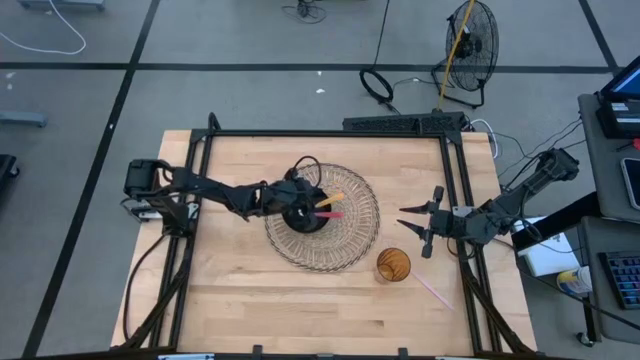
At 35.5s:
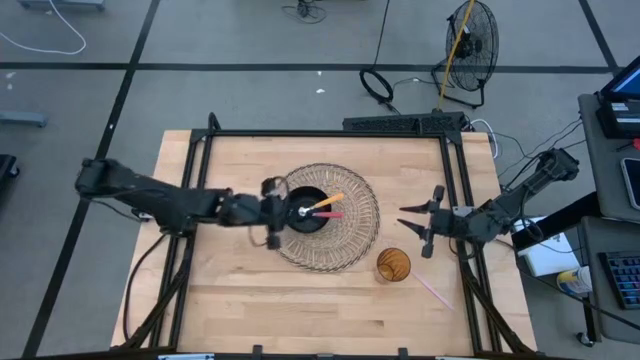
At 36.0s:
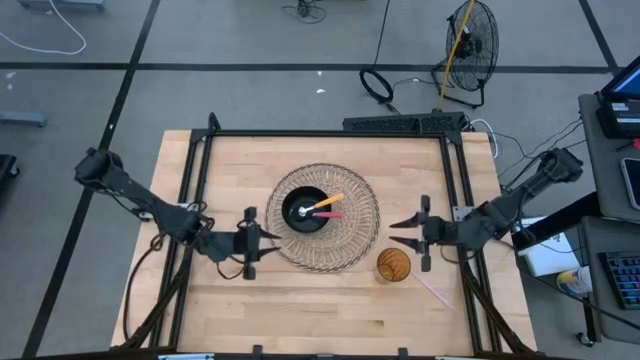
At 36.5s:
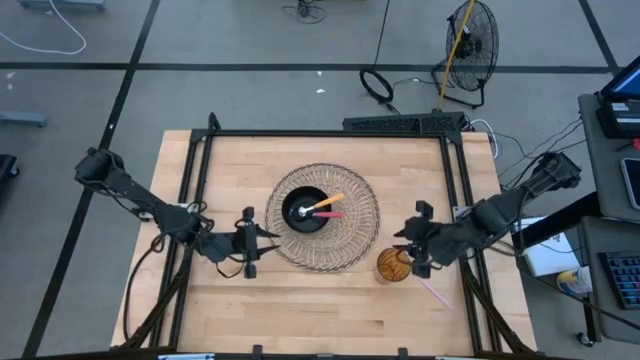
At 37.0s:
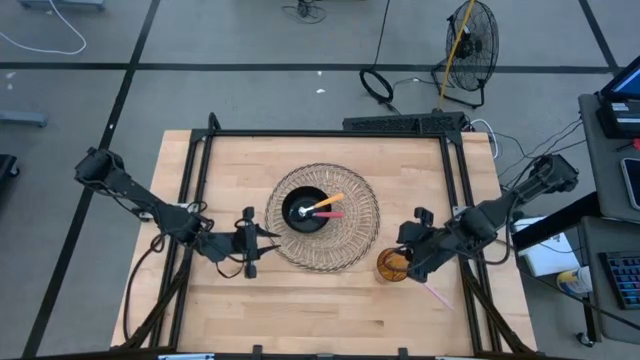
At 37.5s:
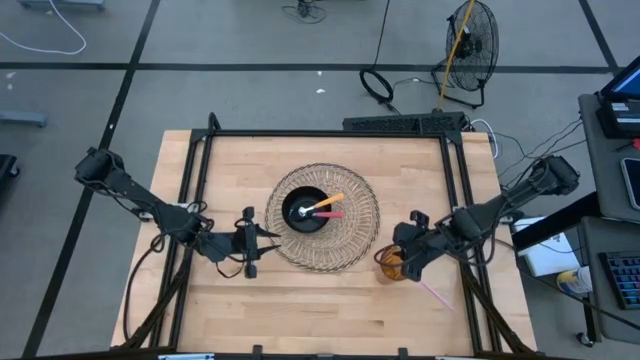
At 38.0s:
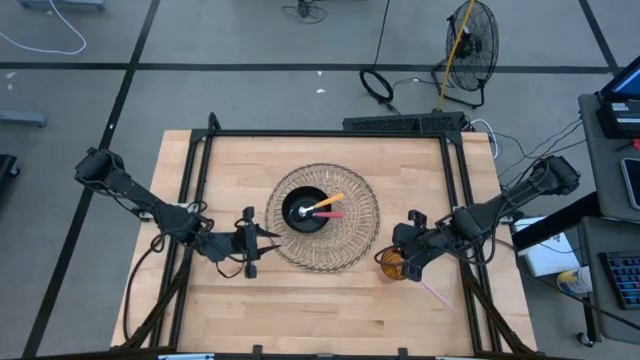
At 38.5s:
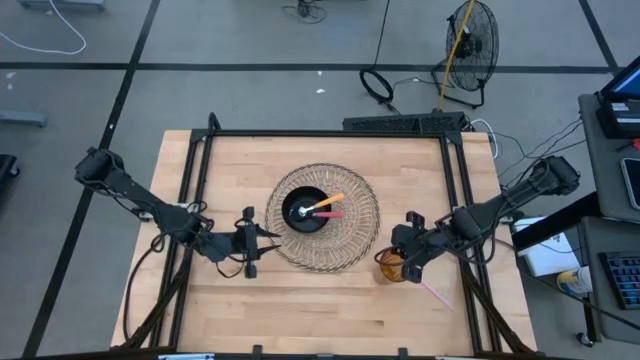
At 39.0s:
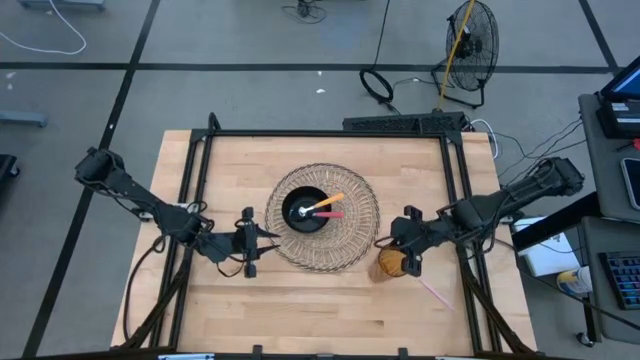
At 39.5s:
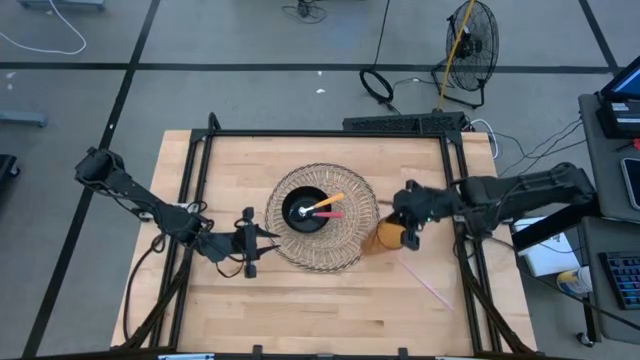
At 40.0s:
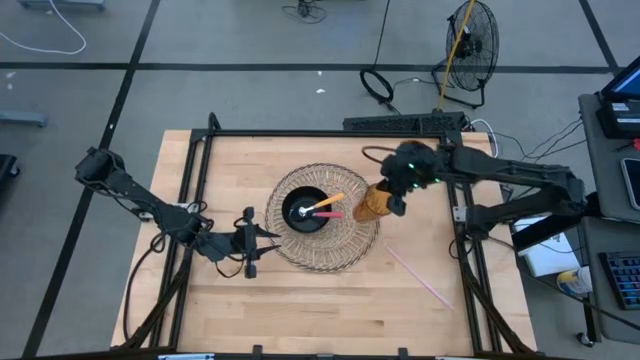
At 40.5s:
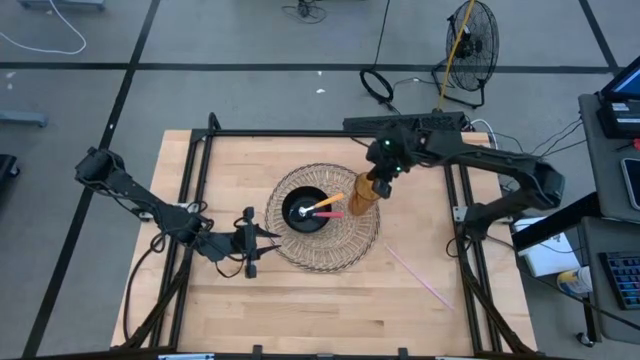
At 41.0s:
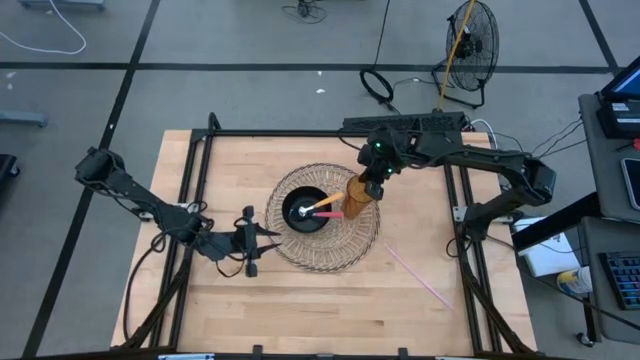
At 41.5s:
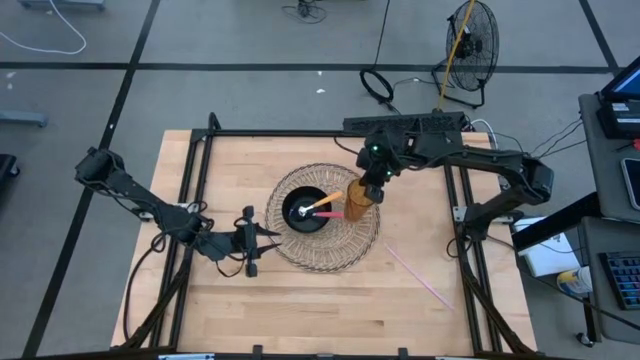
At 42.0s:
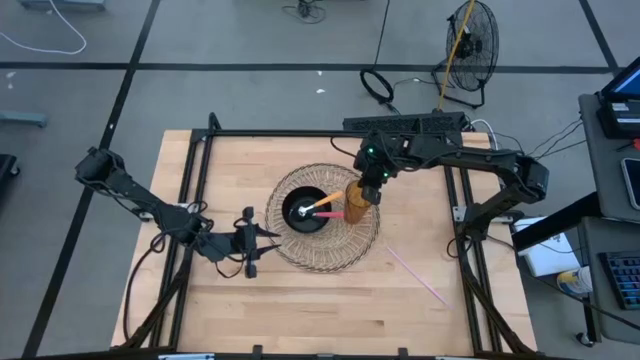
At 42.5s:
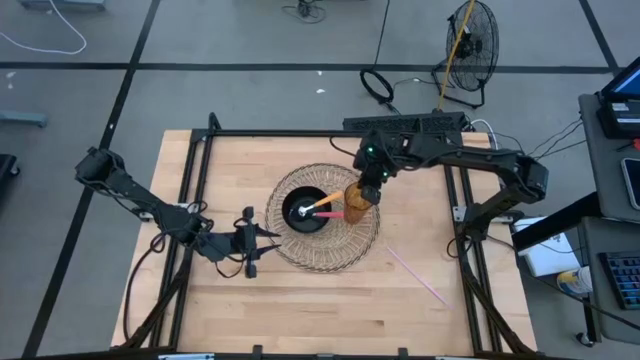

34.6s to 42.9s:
Task: Pick & Place Utensil
Put the yellow glass on the right side of the brown mat

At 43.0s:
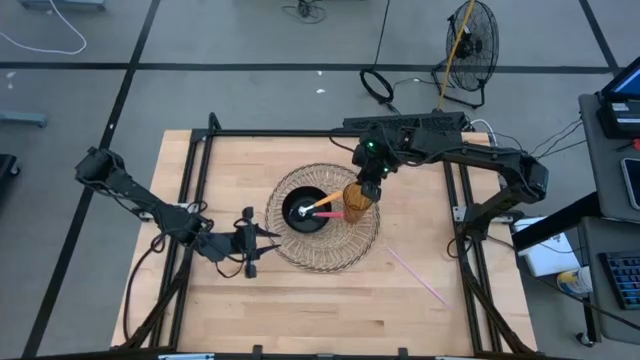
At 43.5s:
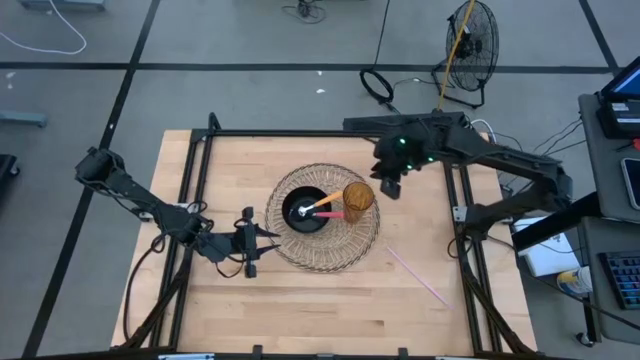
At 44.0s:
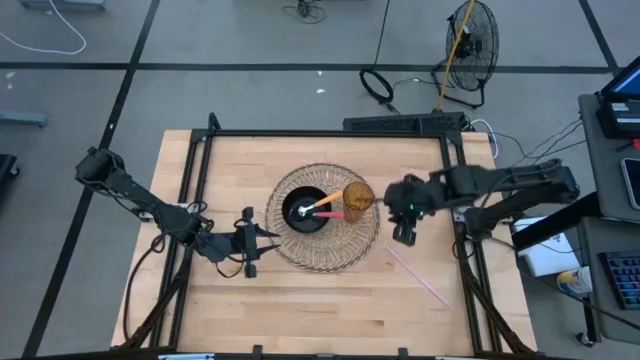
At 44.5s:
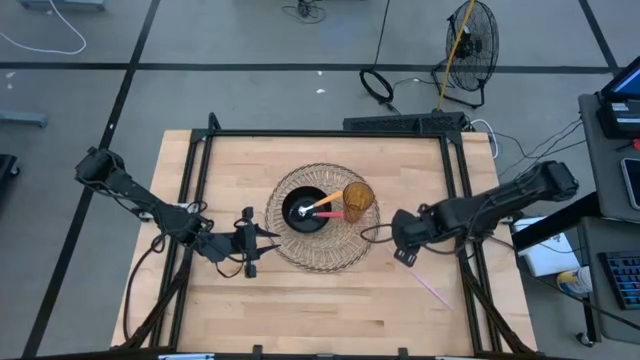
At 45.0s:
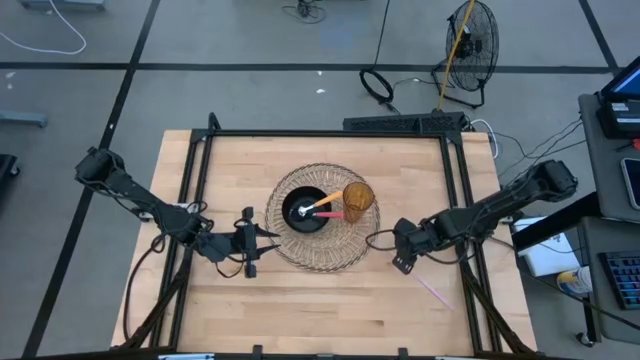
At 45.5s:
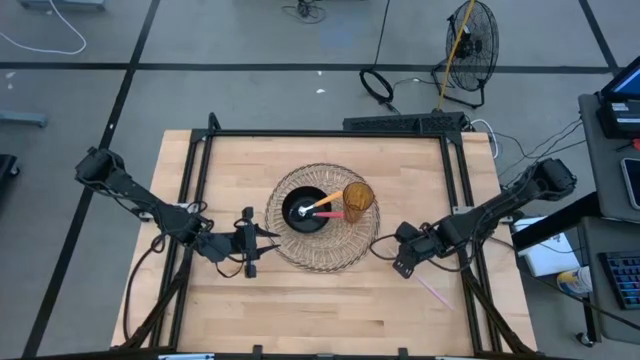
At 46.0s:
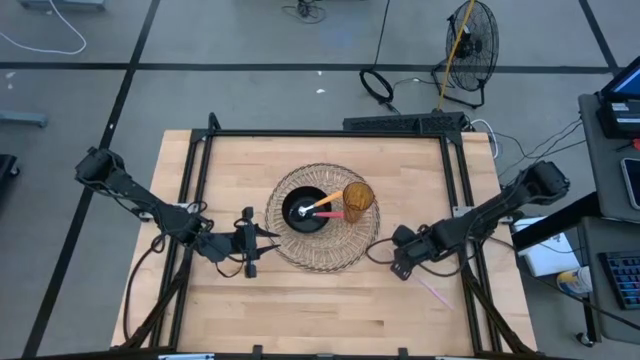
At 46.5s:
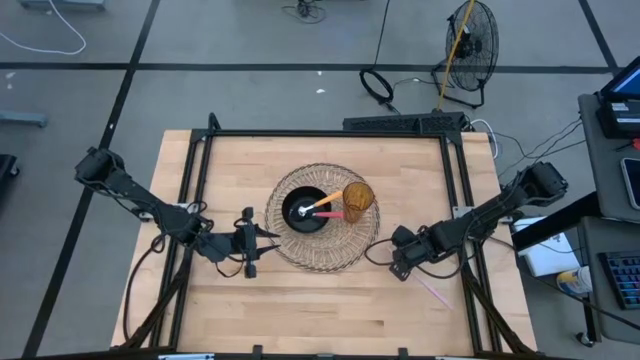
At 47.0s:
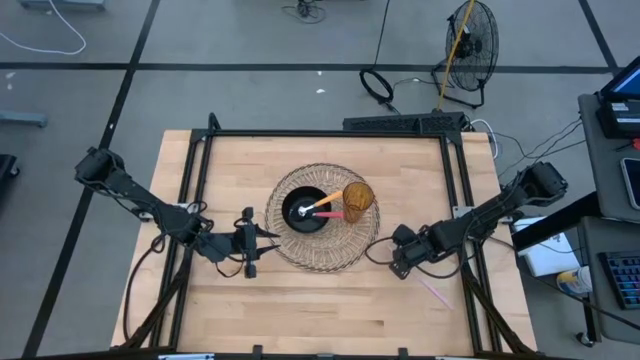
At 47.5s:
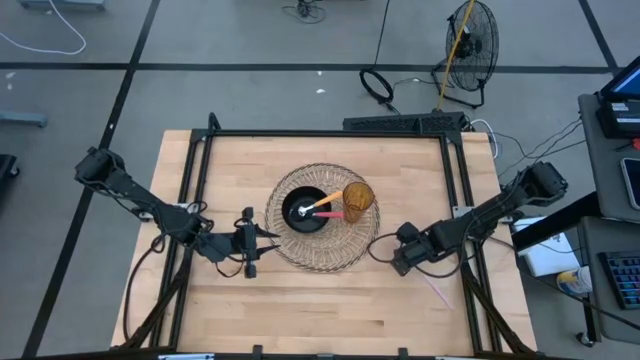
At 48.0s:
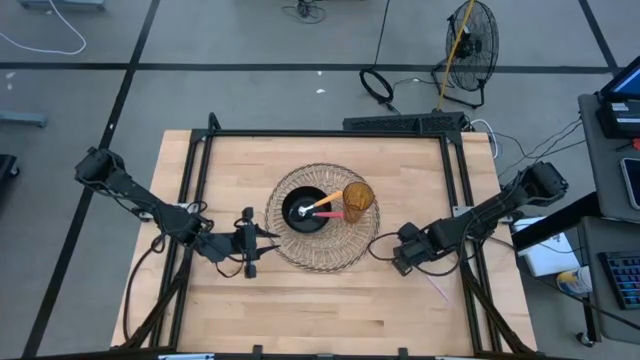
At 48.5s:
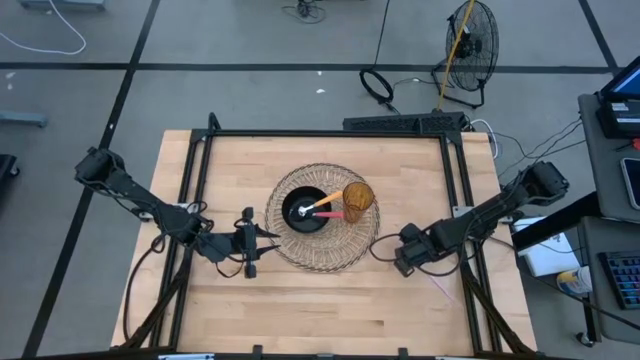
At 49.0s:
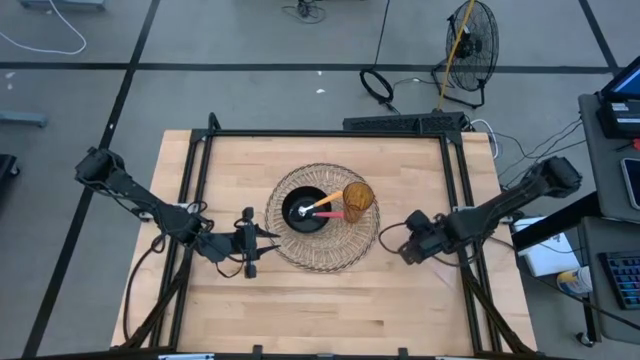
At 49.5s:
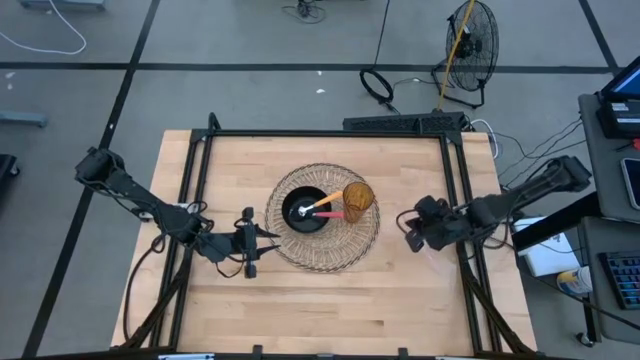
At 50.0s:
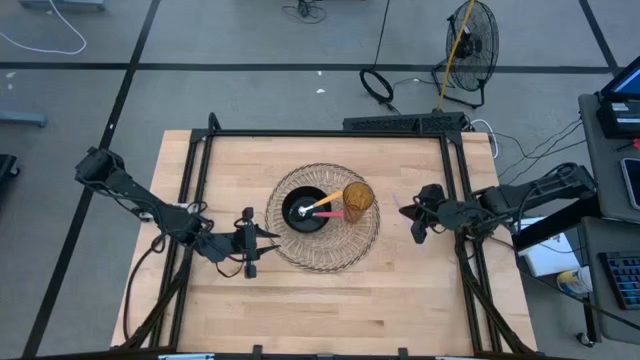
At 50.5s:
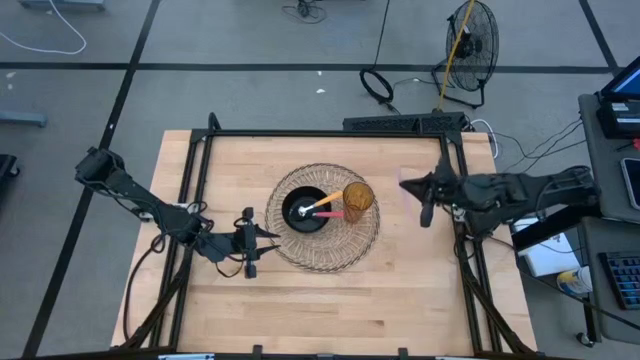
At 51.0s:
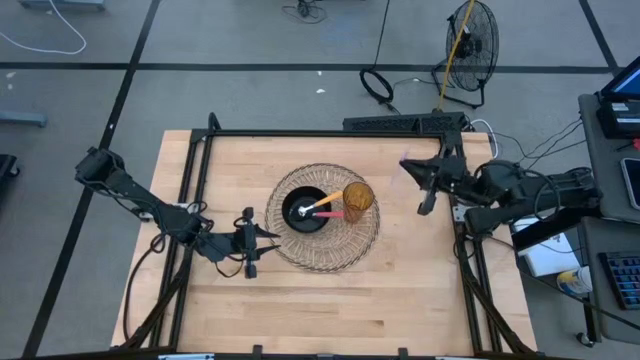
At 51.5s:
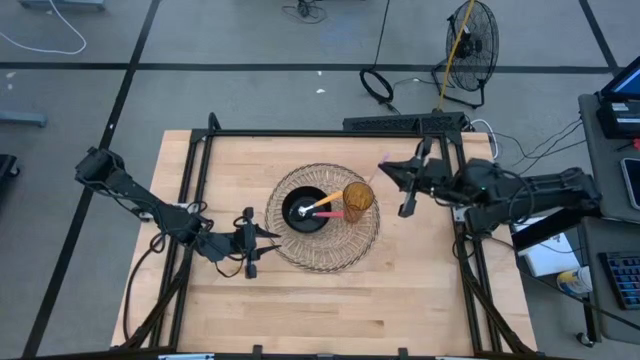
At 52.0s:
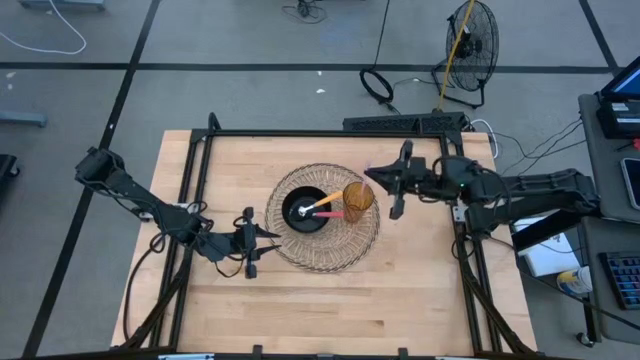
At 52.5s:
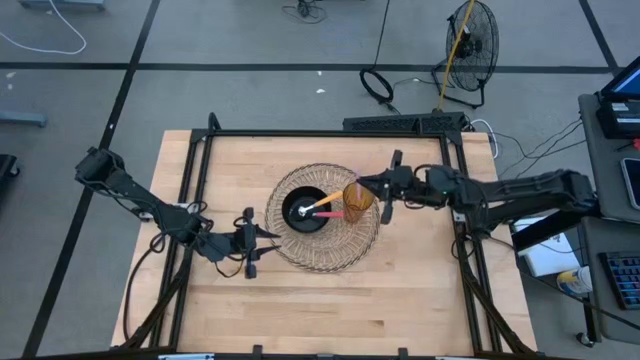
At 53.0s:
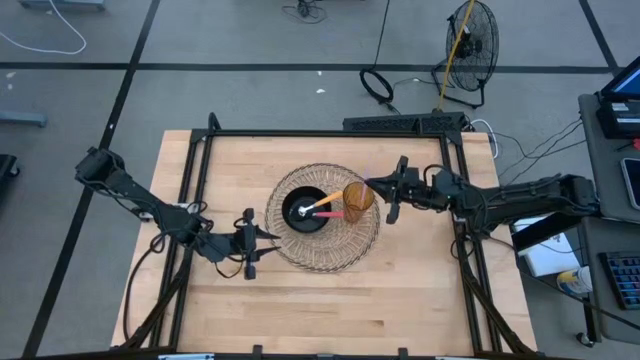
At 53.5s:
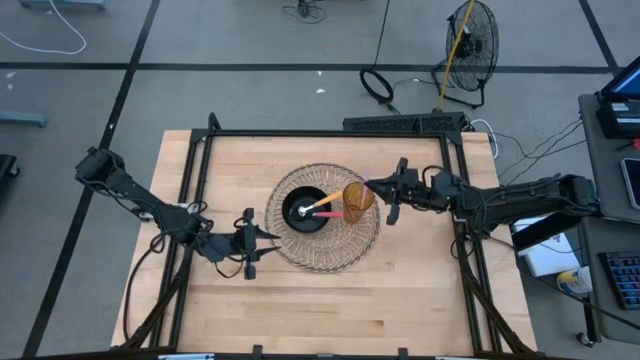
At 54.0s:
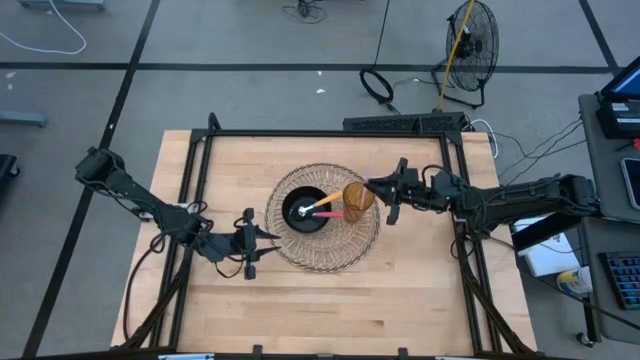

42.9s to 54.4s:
Put the purple straw into the yellow glass

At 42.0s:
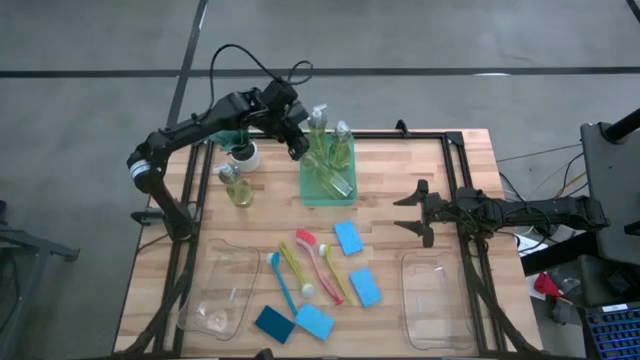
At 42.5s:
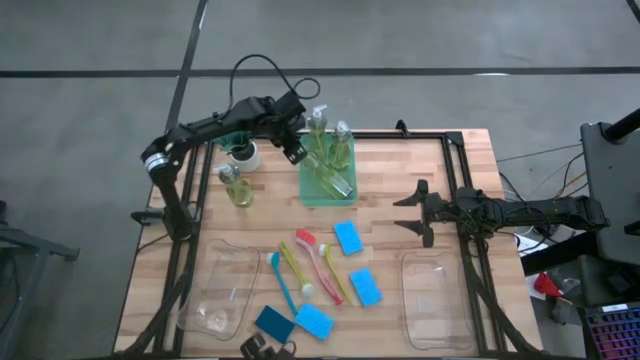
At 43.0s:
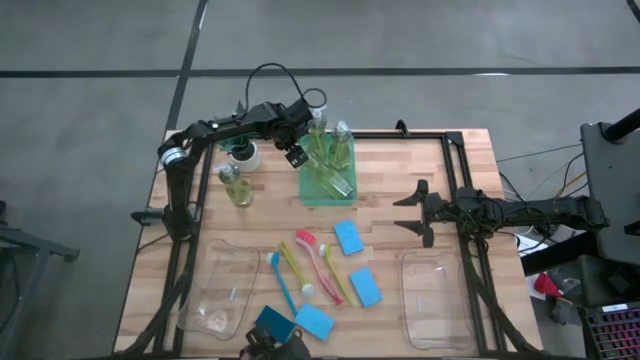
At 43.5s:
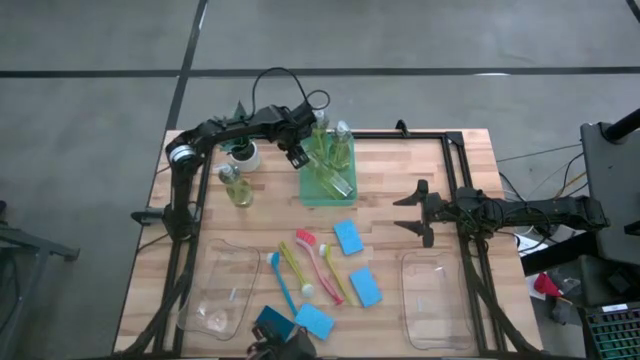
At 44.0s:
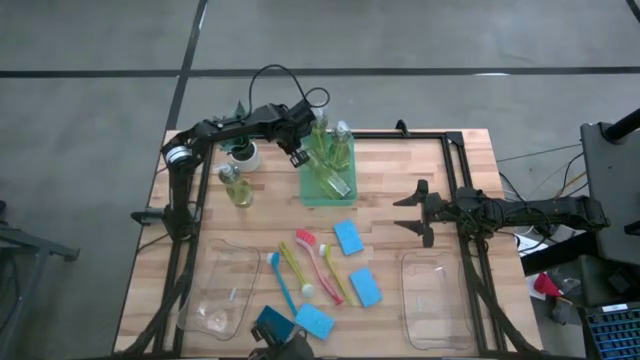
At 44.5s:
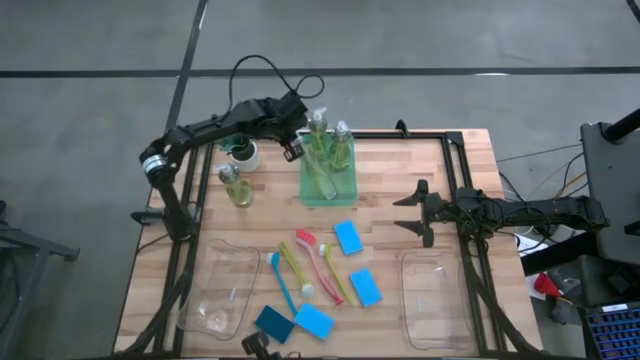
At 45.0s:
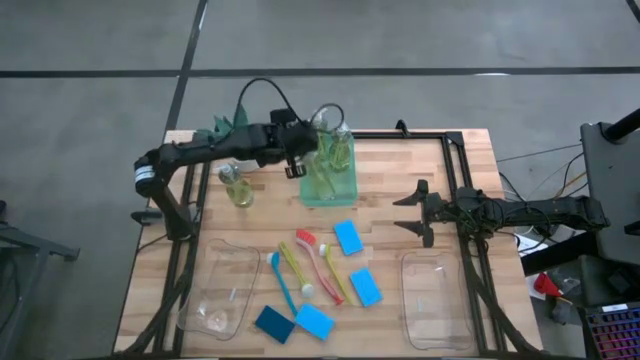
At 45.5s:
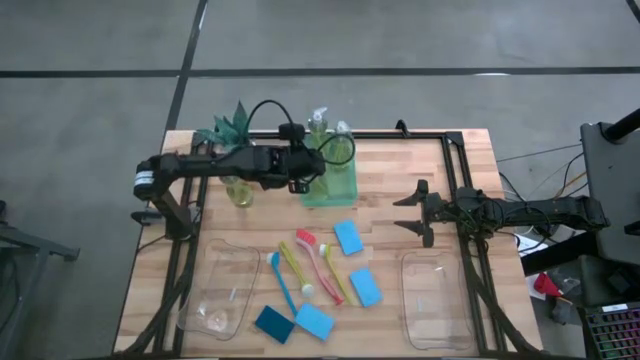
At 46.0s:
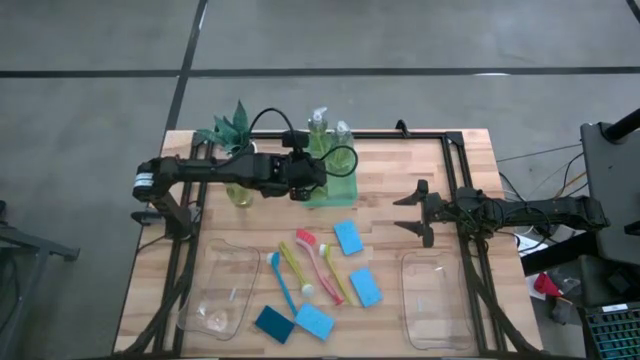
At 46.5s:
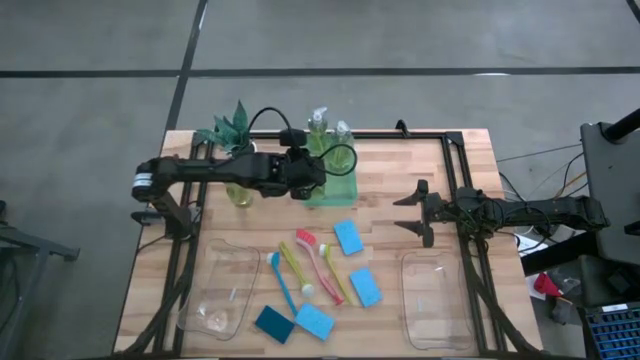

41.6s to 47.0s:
Task: Pick & Place Kitchen Sink Supplies
Put the right dishwashing liquid into the green bin
